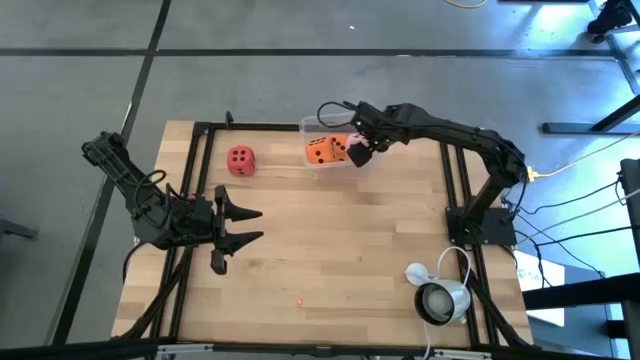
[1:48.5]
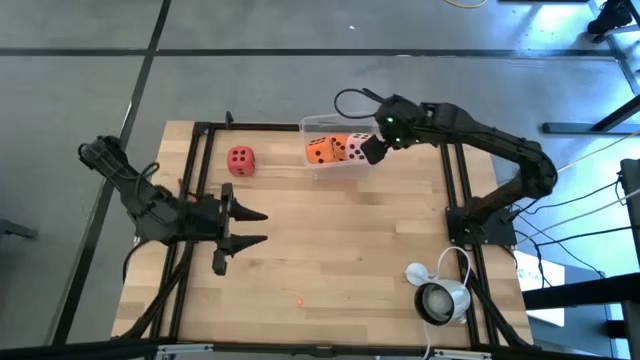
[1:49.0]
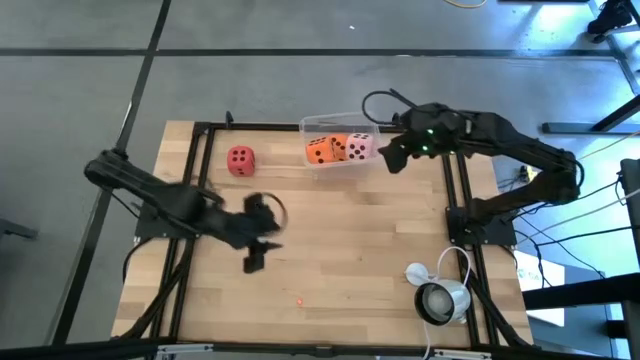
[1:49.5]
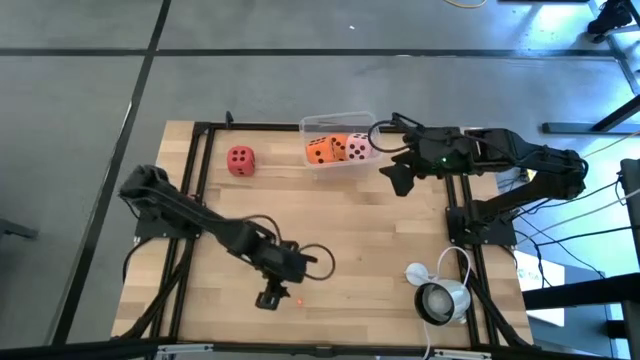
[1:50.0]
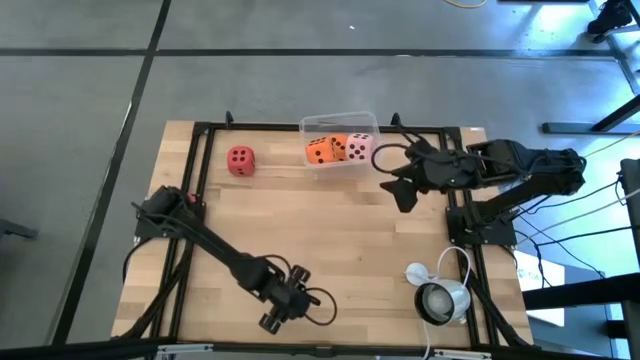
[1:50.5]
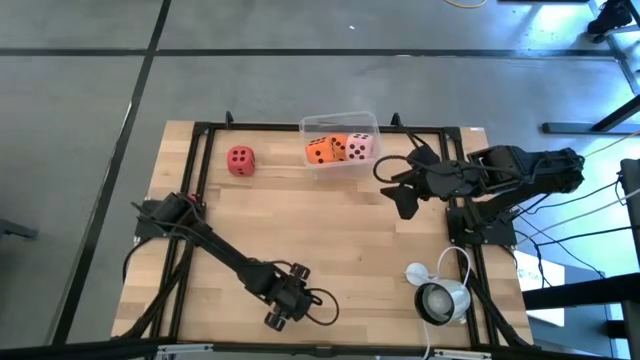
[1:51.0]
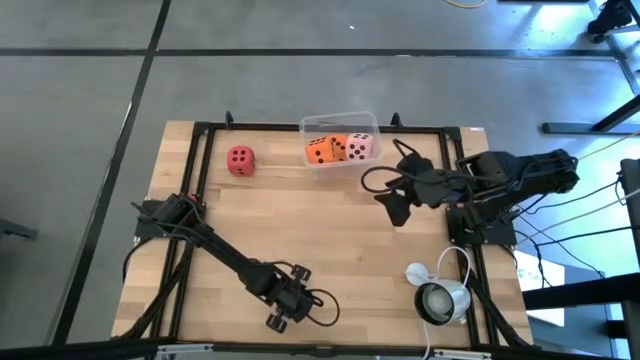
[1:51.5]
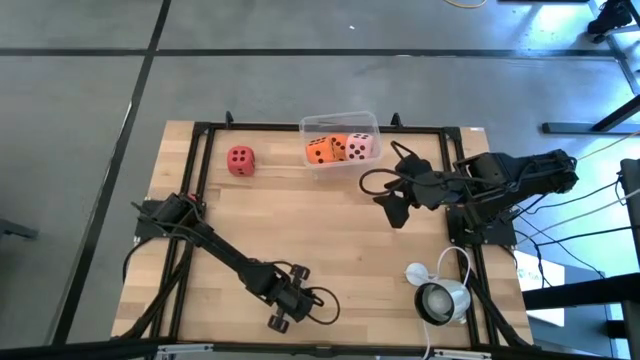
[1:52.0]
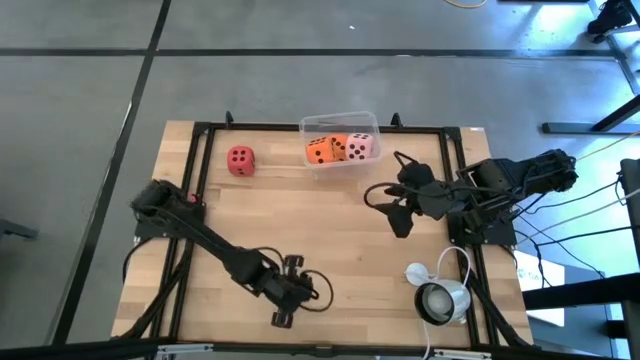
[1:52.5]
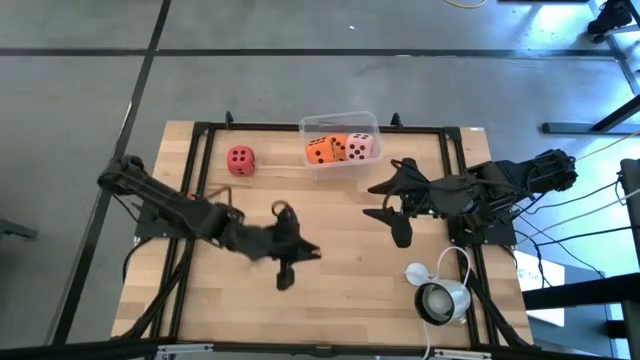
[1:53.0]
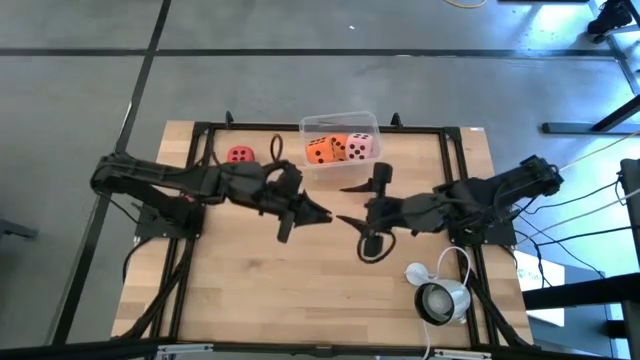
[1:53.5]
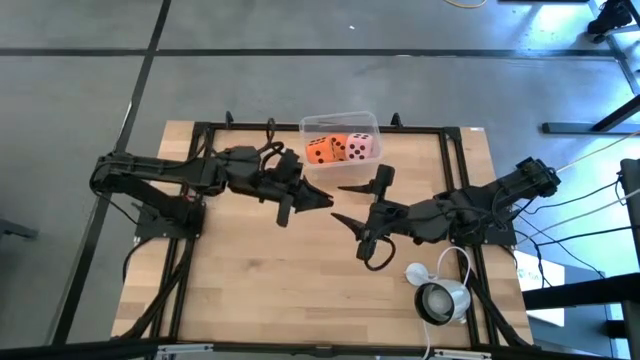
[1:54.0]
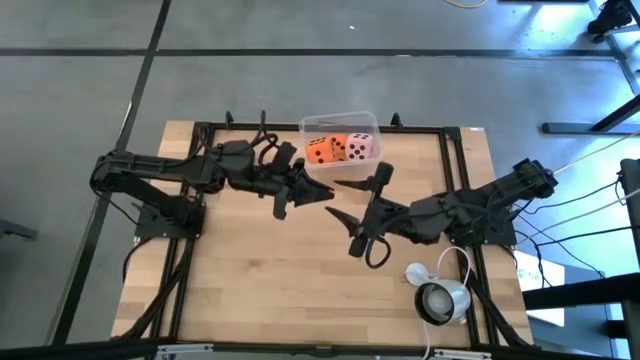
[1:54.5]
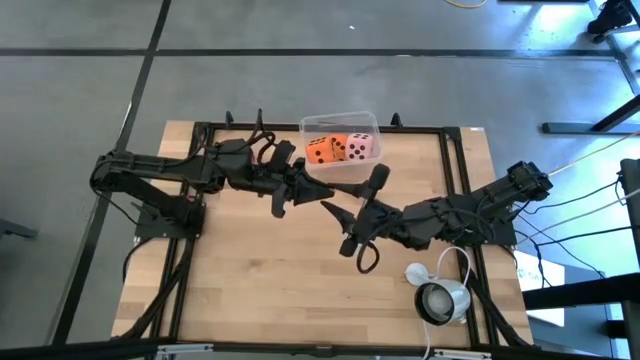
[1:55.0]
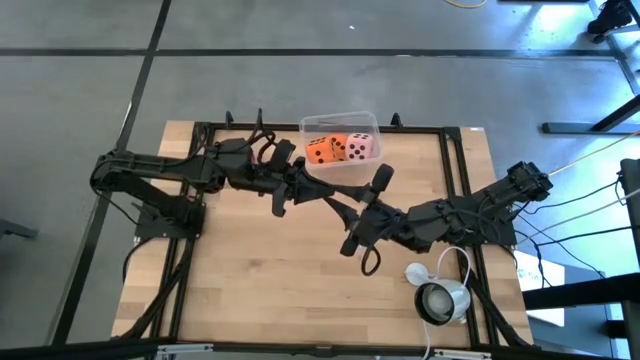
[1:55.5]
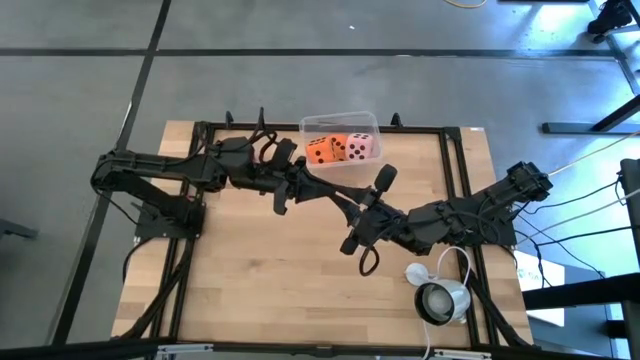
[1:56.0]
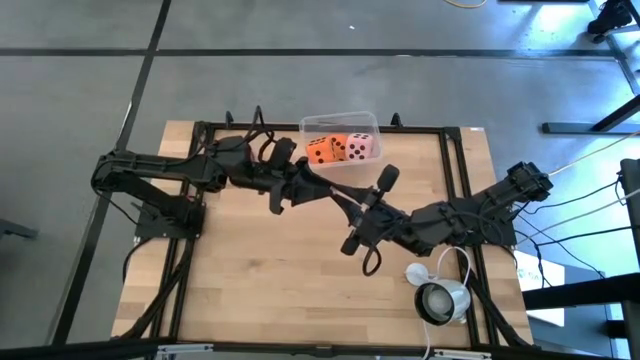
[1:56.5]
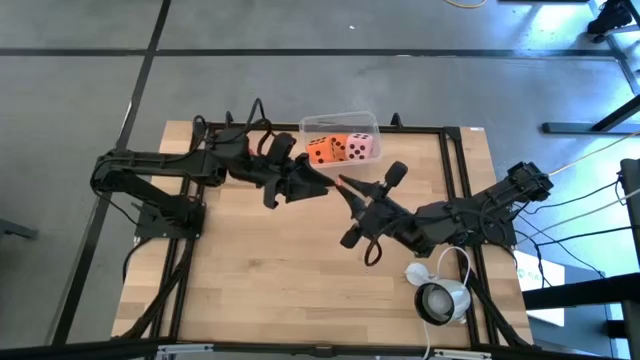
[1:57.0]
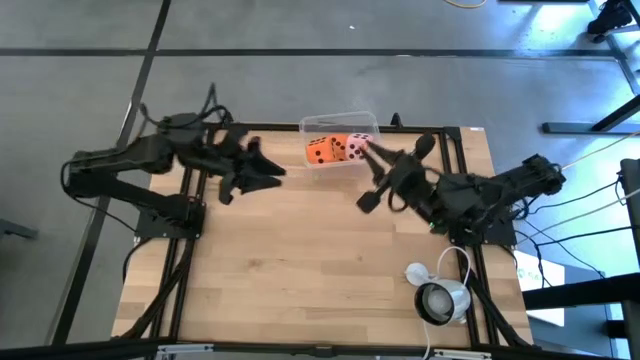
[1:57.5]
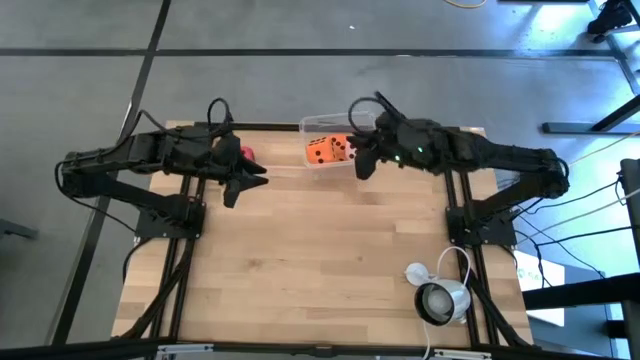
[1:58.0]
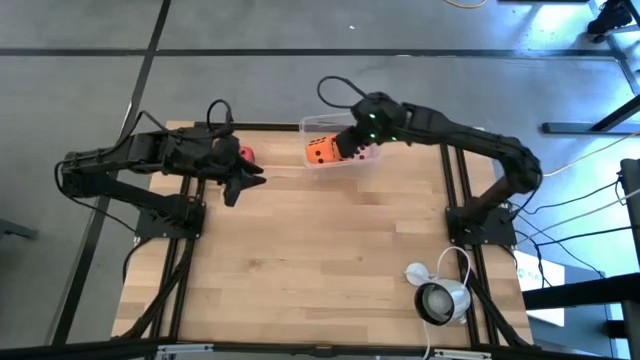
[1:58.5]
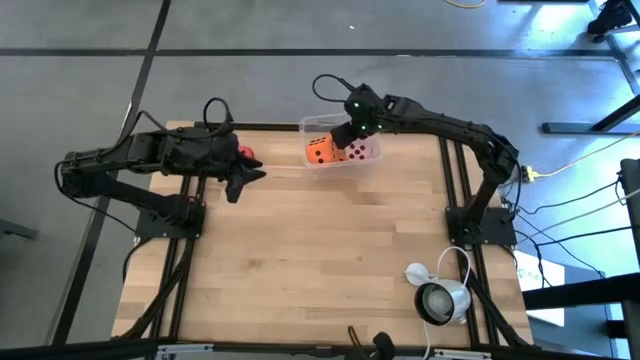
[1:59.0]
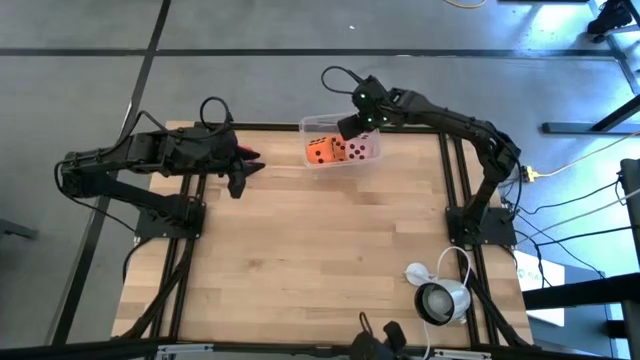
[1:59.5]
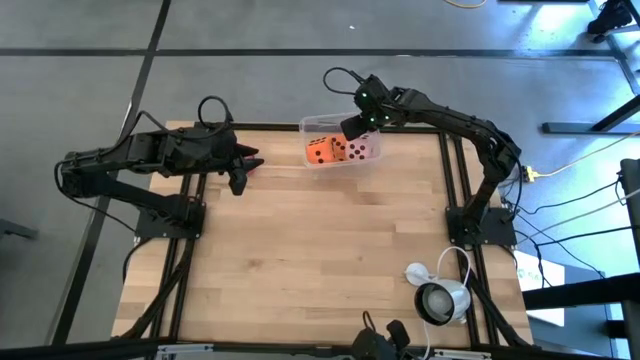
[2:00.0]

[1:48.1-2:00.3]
Task: Pick & Place Dice
Put the small orange dice into the transparent bin

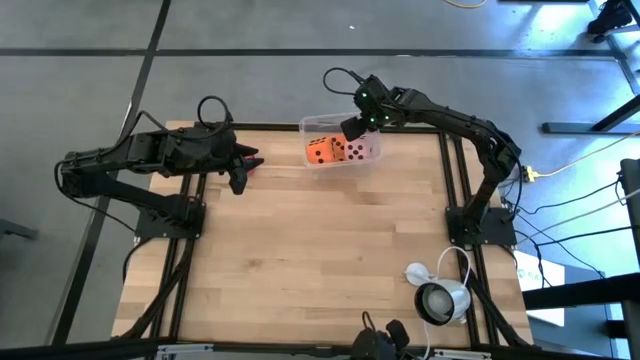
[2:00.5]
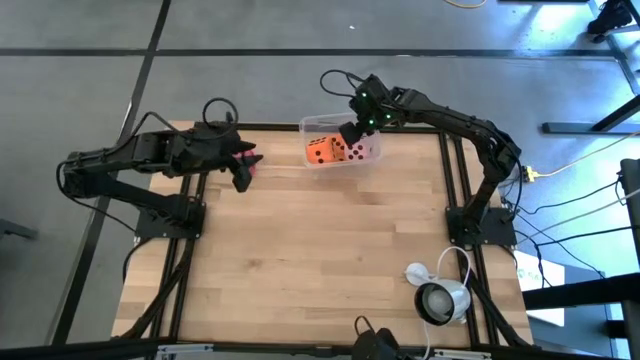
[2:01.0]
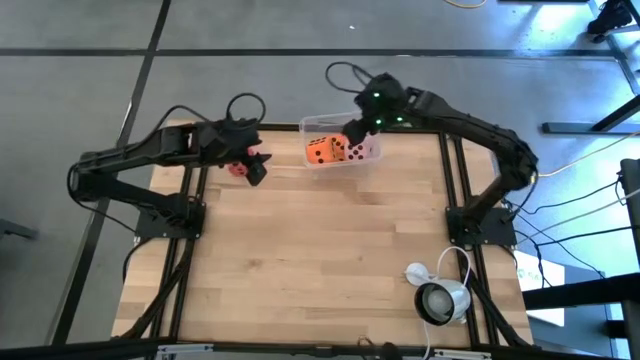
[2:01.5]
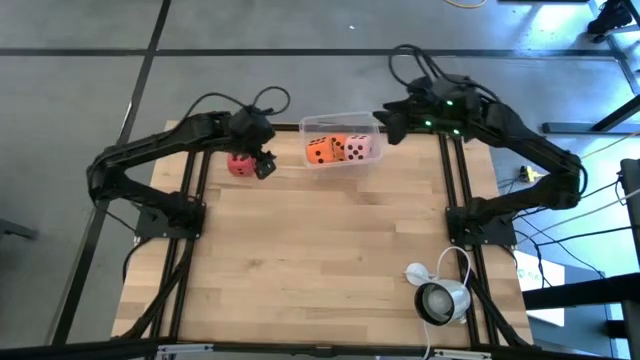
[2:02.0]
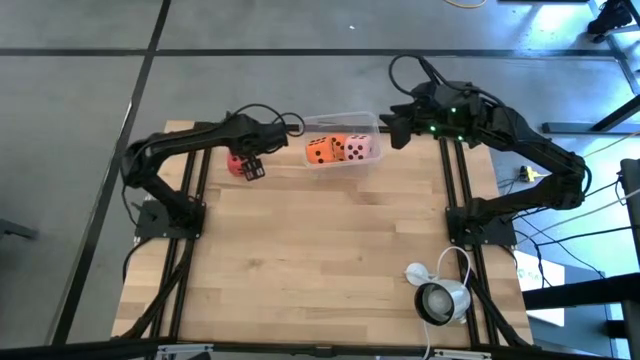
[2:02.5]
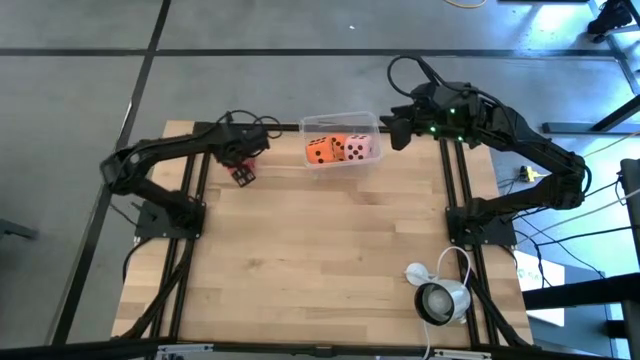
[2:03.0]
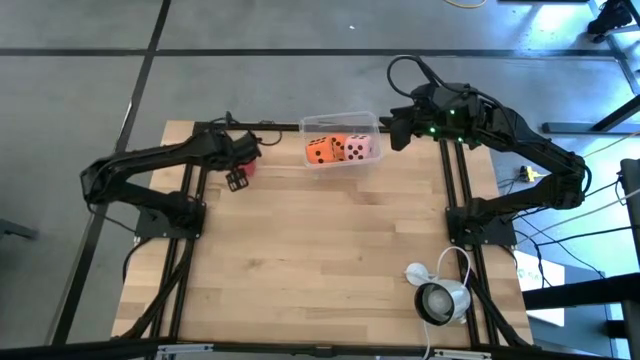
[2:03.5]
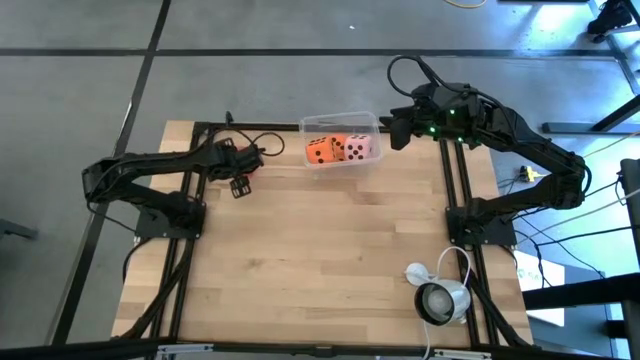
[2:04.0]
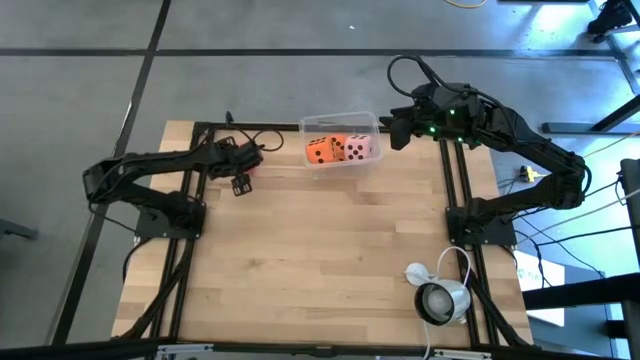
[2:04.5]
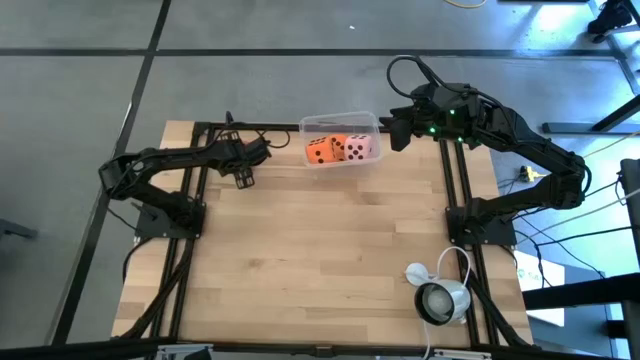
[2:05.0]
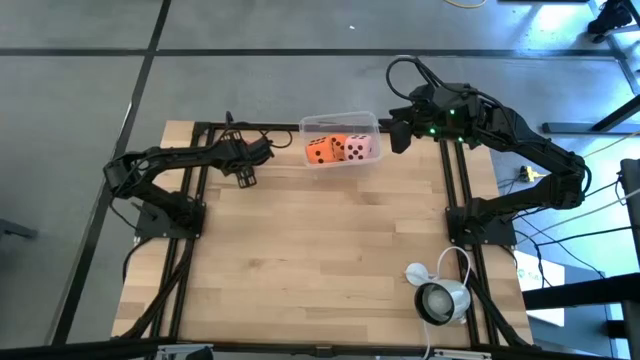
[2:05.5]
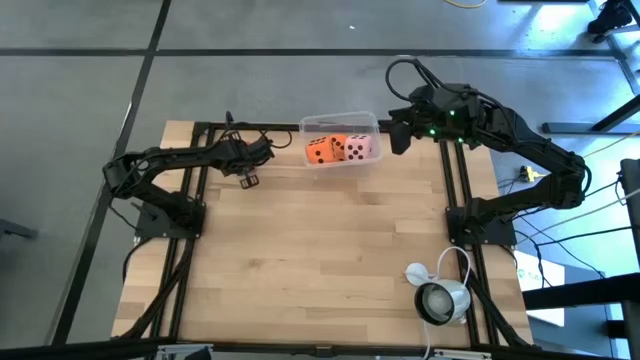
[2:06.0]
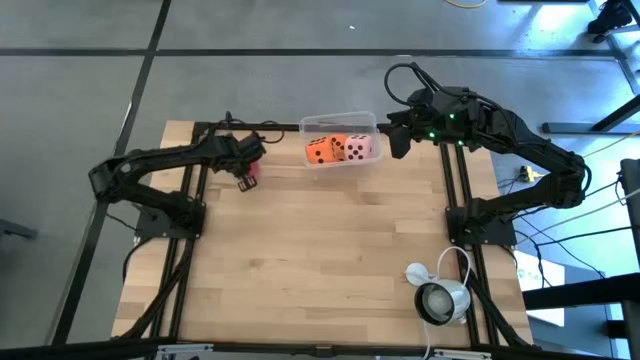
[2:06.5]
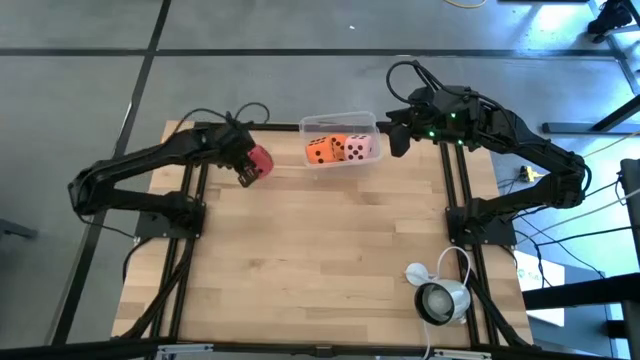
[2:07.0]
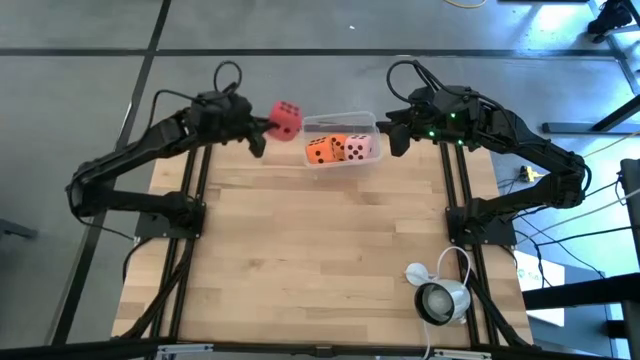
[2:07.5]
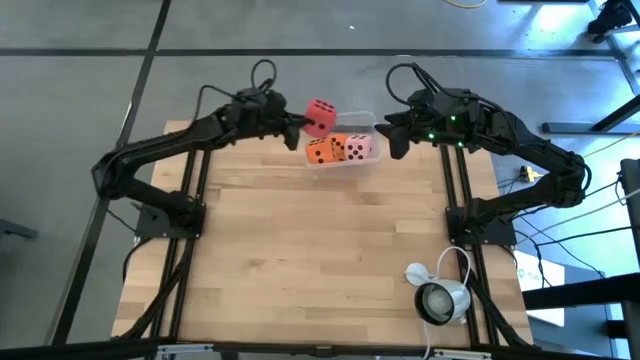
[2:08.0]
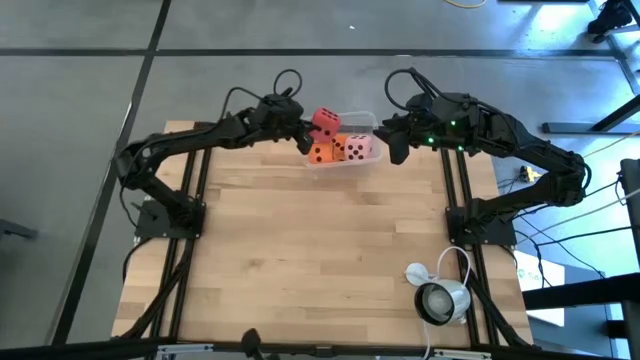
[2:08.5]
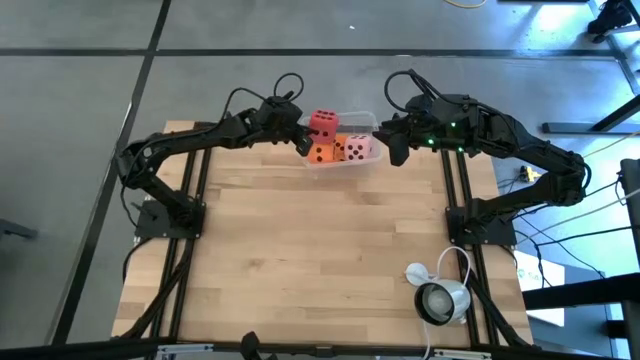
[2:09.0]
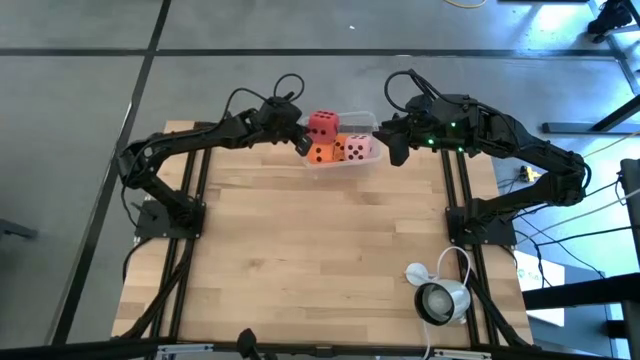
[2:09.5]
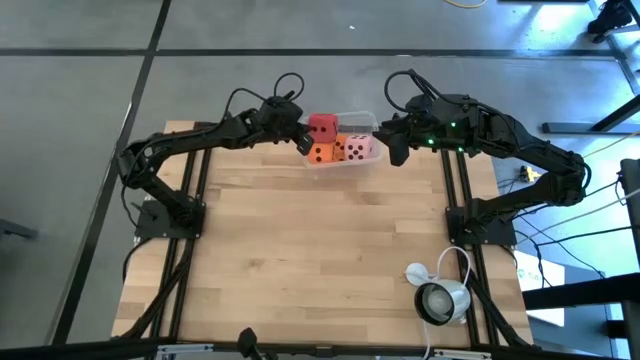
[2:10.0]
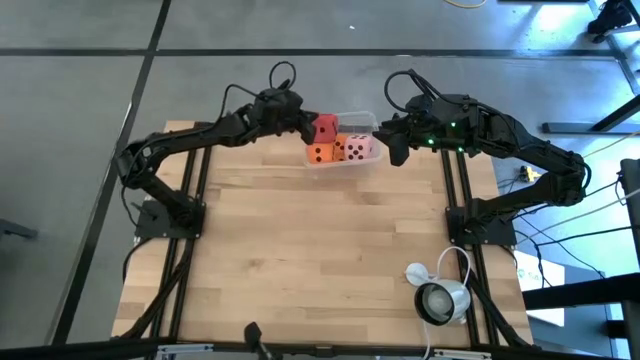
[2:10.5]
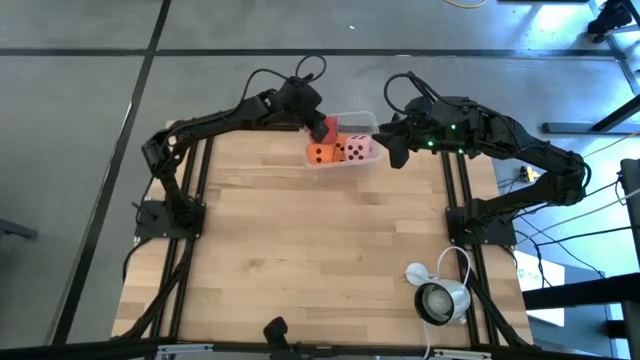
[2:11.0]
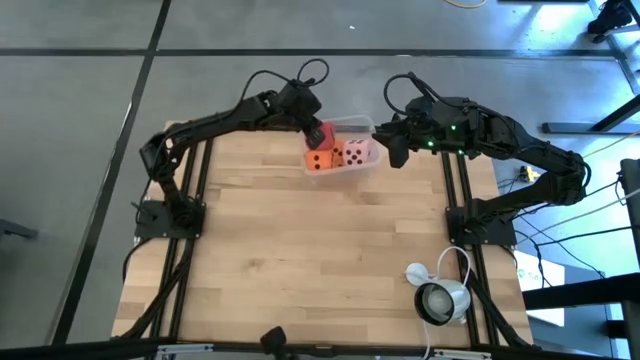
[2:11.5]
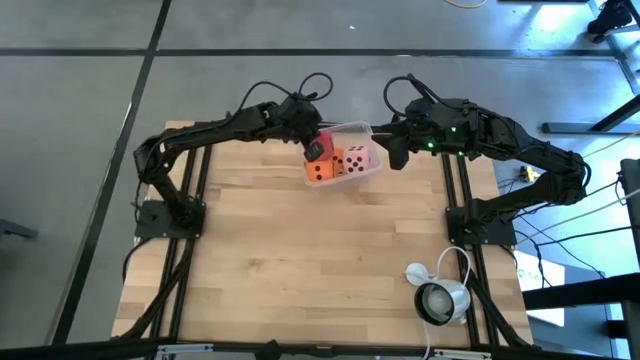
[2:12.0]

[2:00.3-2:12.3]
Put the large red dice into the transparent bin
